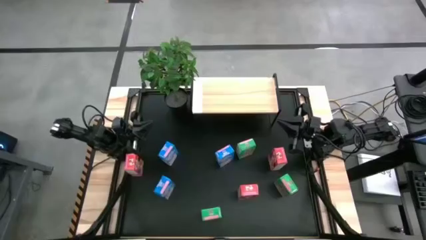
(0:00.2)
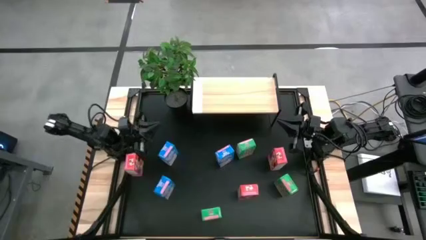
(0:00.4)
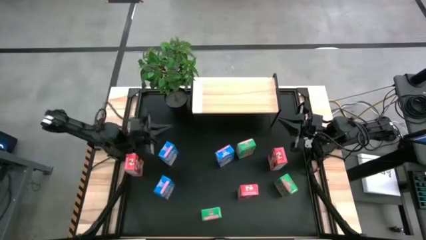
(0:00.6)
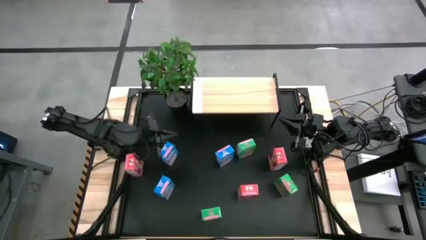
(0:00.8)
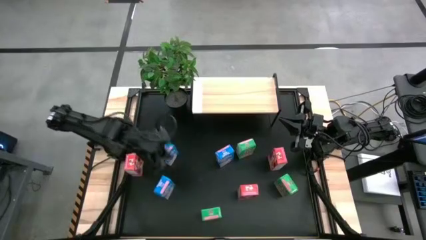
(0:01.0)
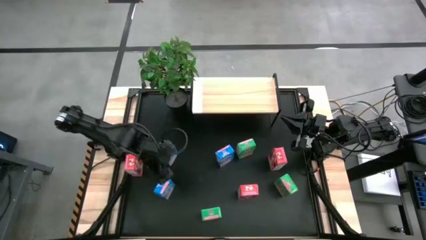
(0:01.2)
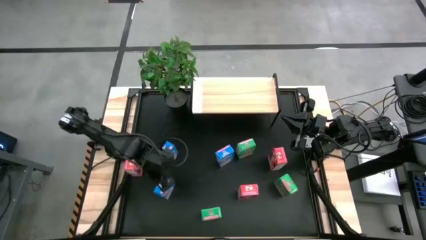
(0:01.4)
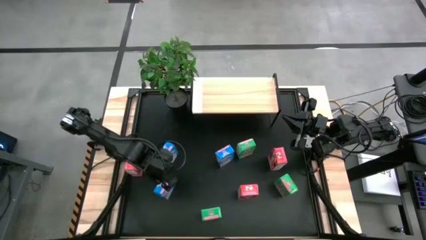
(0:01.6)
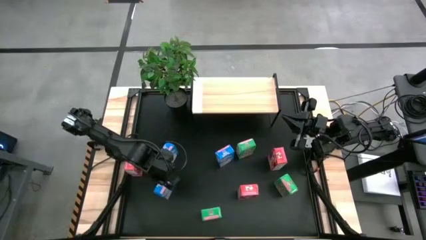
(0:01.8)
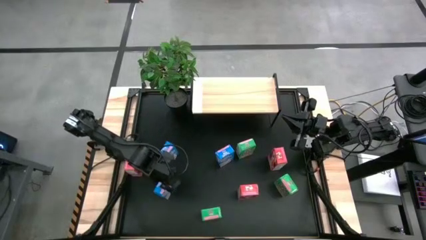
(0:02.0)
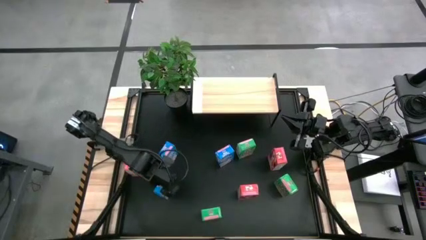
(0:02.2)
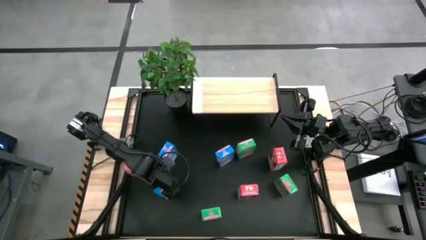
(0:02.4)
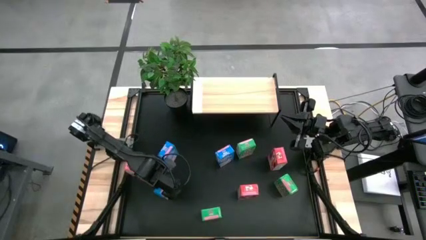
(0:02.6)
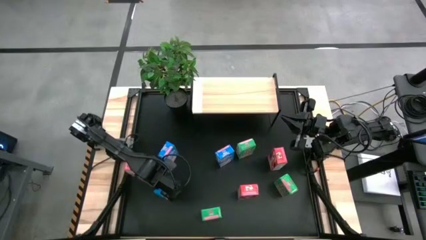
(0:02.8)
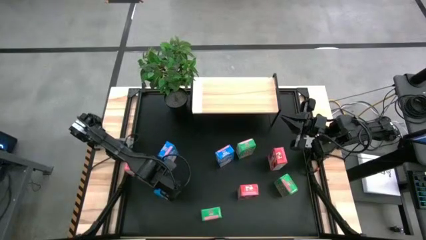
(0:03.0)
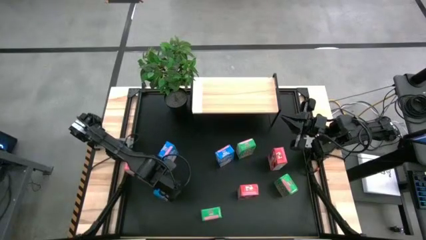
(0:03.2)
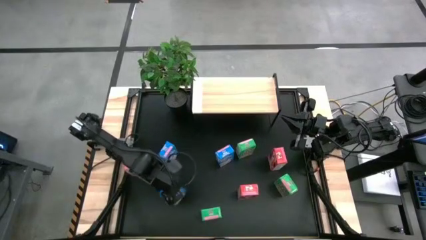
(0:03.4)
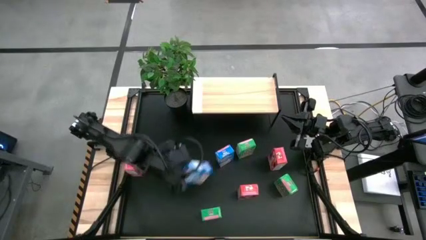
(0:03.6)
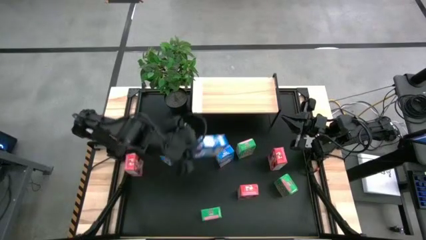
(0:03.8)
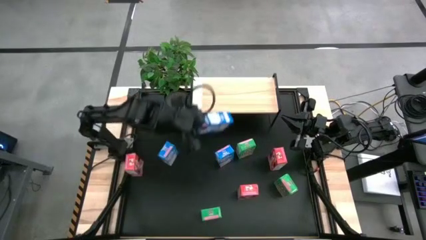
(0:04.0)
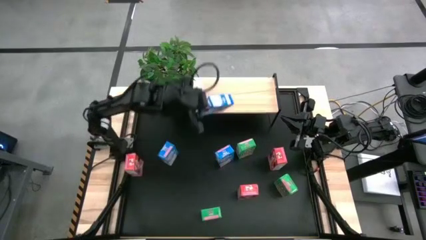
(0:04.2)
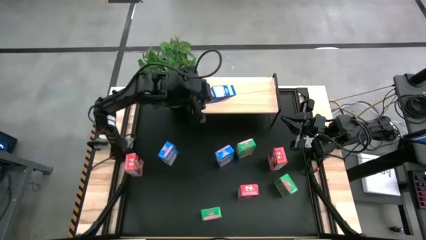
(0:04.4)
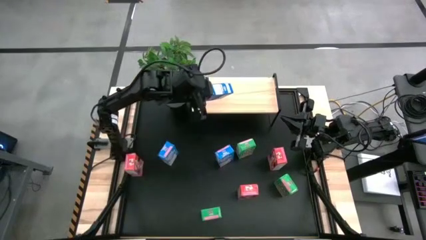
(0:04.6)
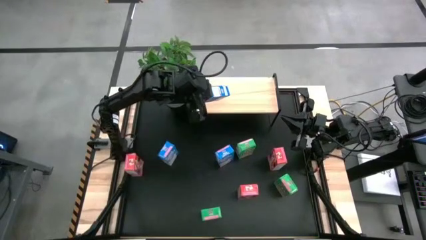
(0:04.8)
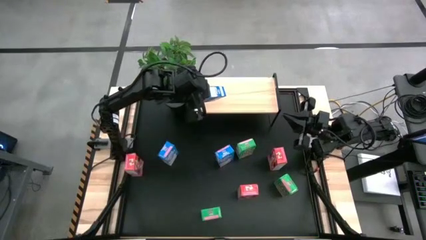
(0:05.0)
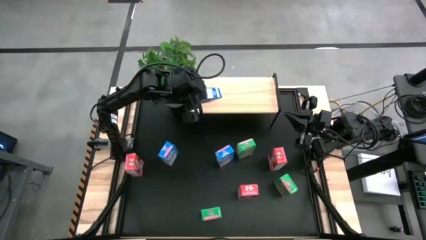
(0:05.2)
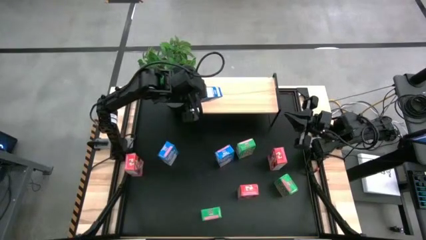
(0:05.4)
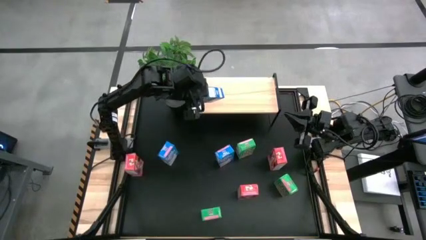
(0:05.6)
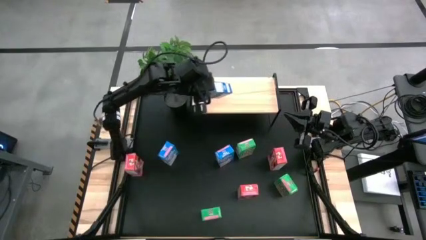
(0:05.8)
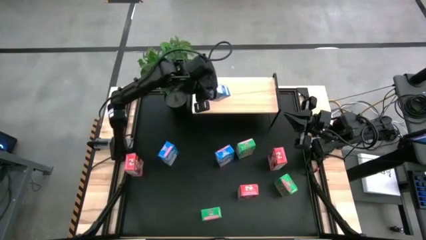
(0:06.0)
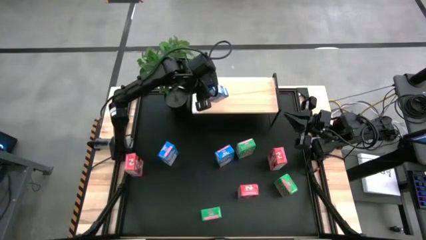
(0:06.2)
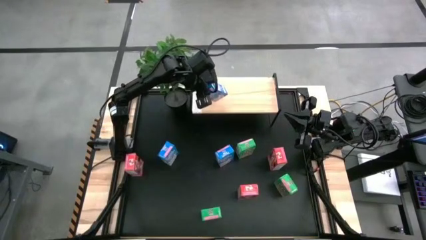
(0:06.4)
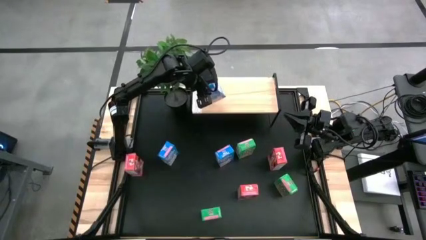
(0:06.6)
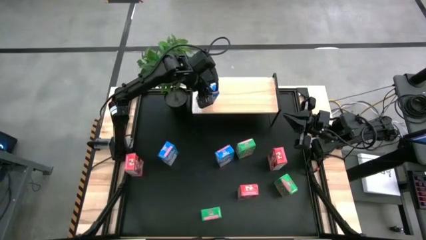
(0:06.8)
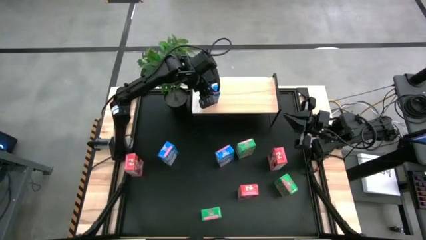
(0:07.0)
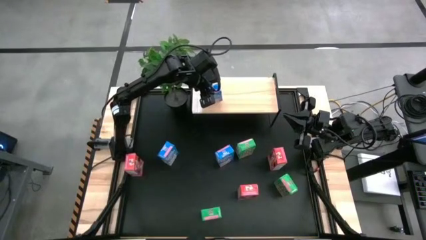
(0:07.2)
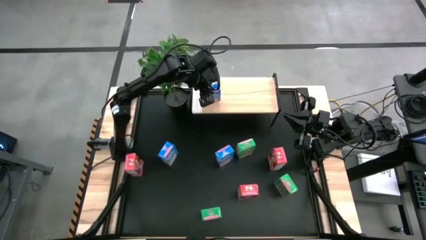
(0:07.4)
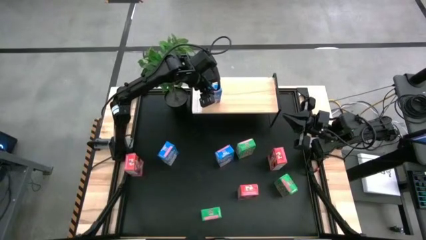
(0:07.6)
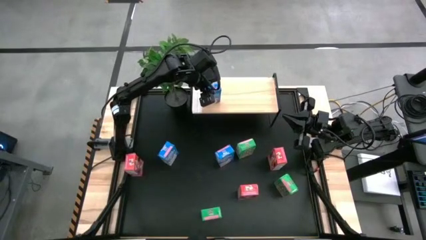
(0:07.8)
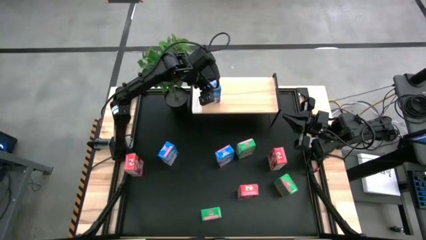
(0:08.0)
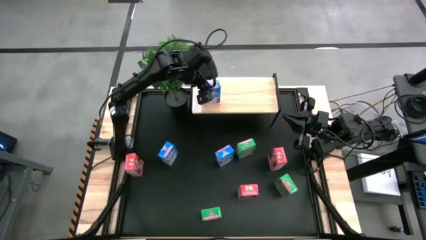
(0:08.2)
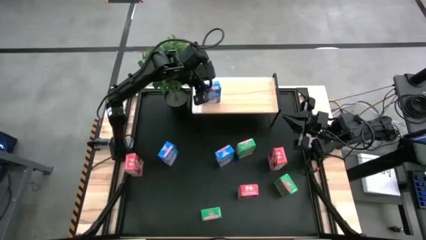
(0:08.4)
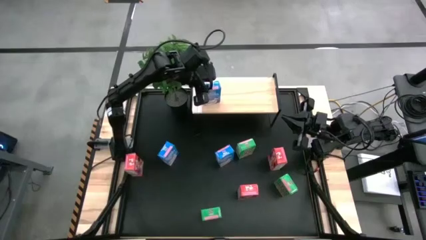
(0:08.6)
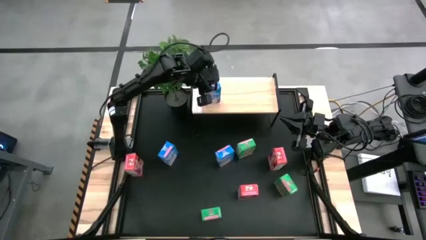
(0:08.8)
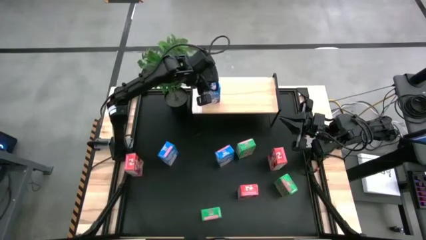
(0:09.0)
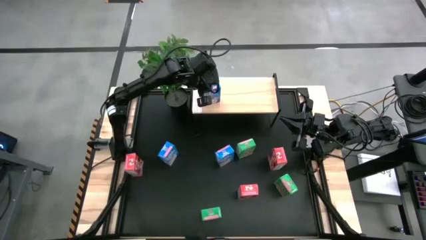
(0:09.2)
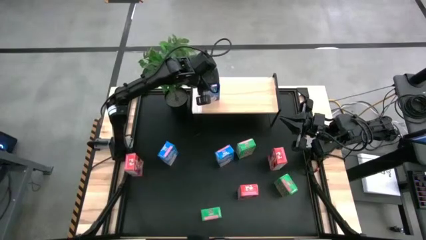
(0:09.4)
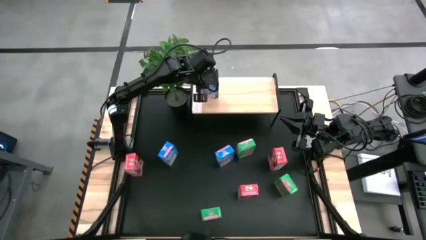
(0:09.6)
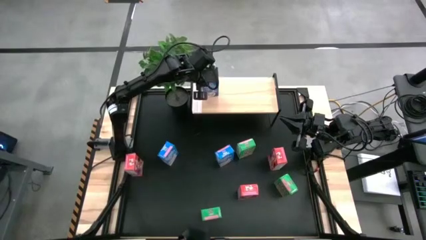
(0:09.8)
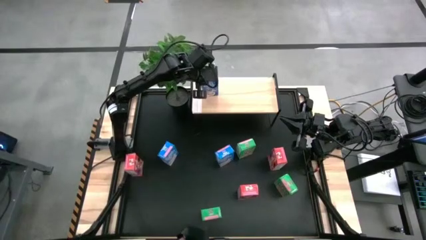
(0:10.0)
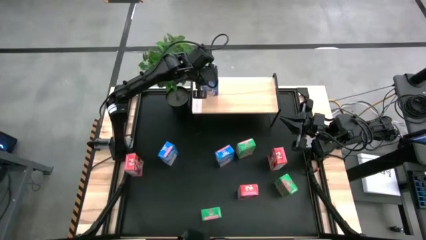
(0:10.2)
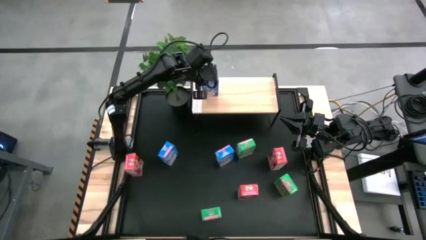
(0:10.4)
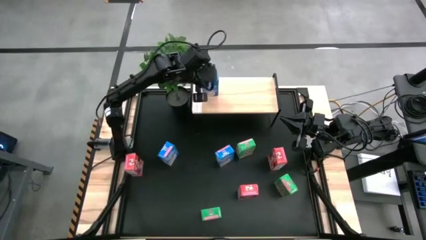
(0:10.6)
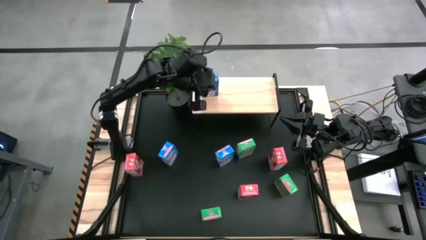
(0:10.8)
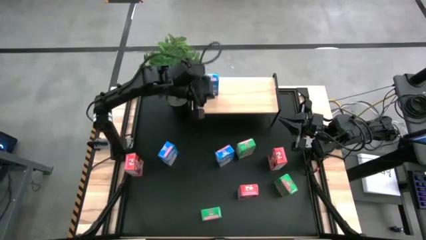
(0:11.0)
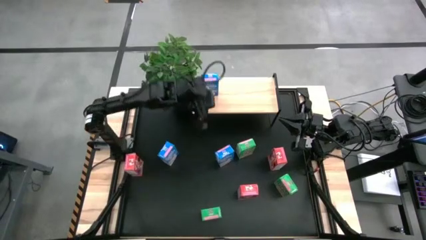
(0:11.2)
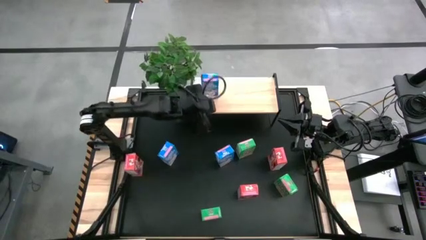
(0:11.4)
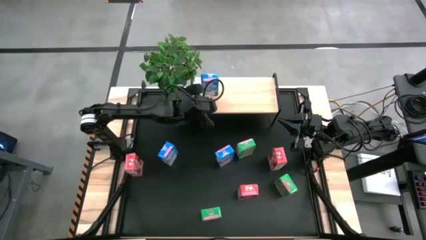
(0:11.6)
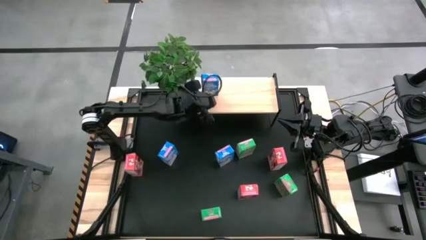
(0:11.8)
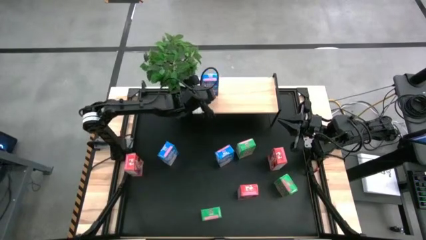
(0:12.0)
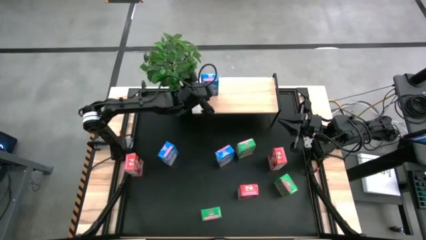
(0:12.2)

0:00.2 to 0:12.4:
Task: Stack cereal on shelf
Put the bottom left blue cereal box on the shelf
